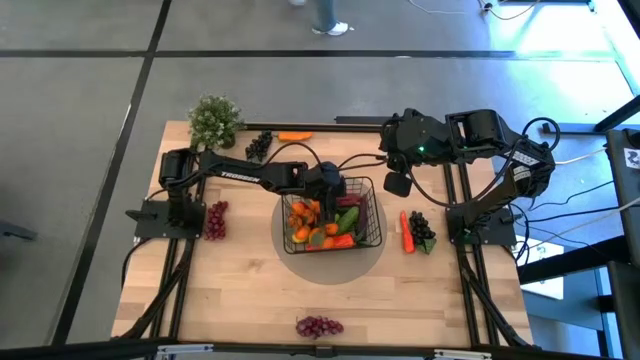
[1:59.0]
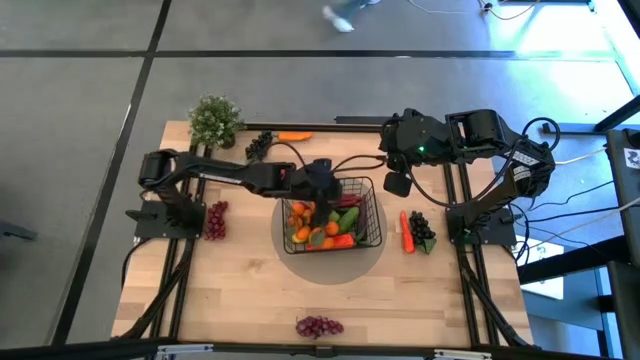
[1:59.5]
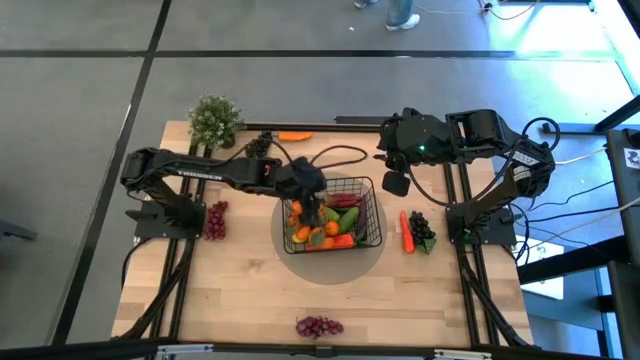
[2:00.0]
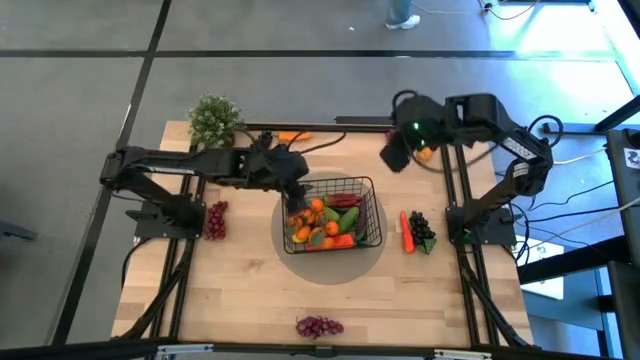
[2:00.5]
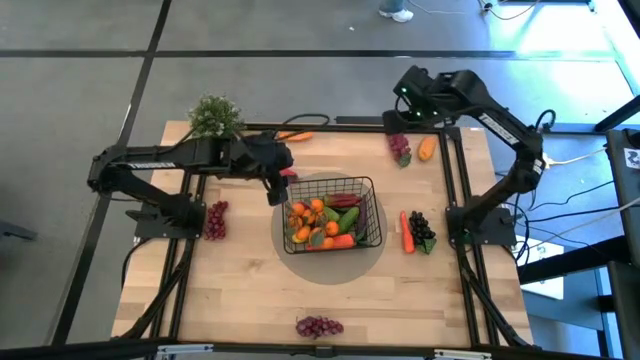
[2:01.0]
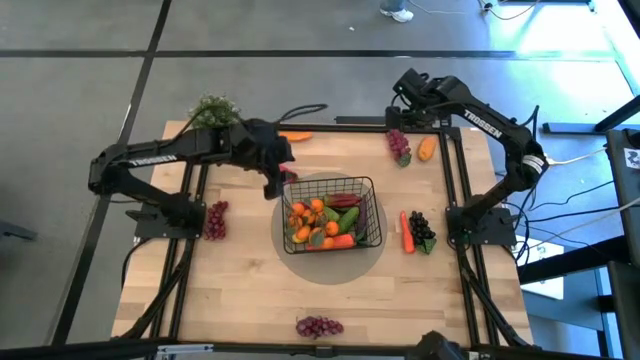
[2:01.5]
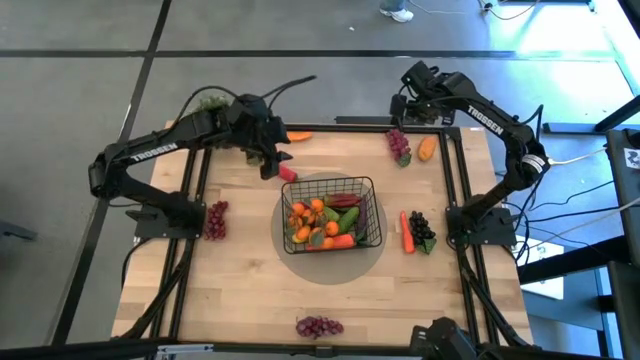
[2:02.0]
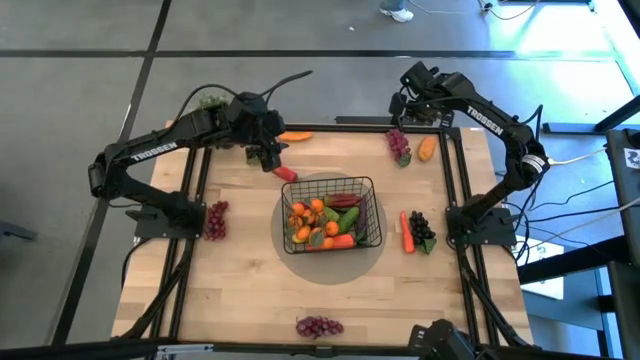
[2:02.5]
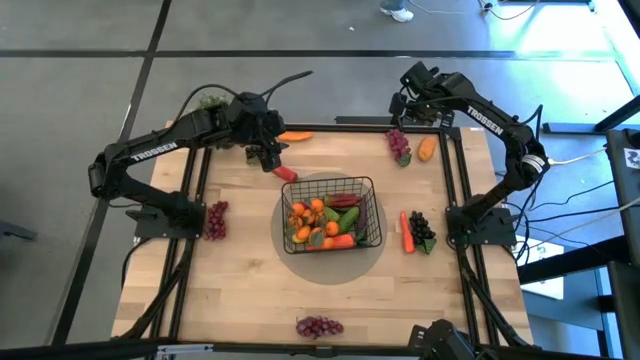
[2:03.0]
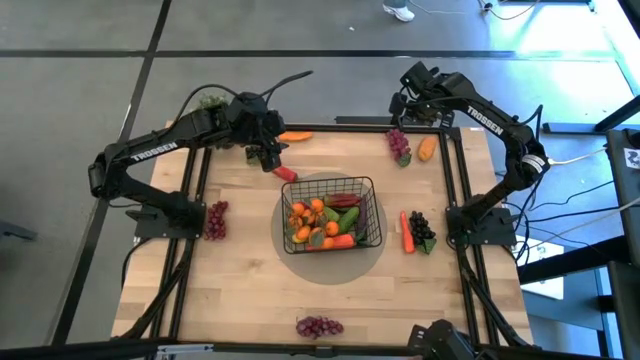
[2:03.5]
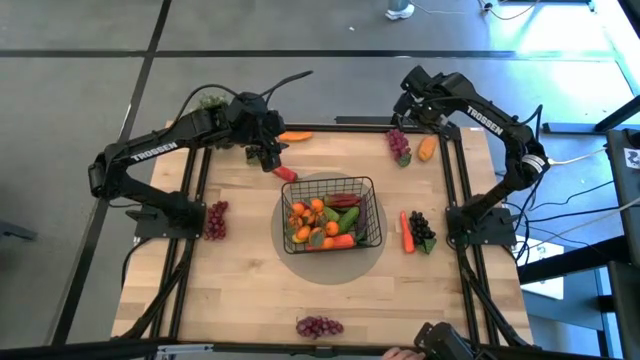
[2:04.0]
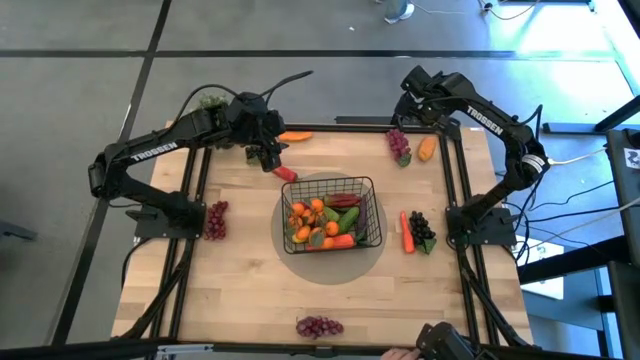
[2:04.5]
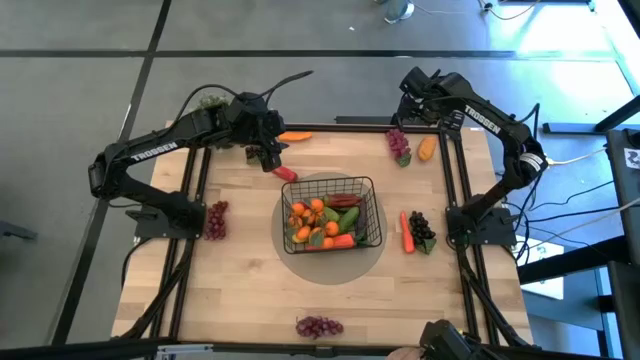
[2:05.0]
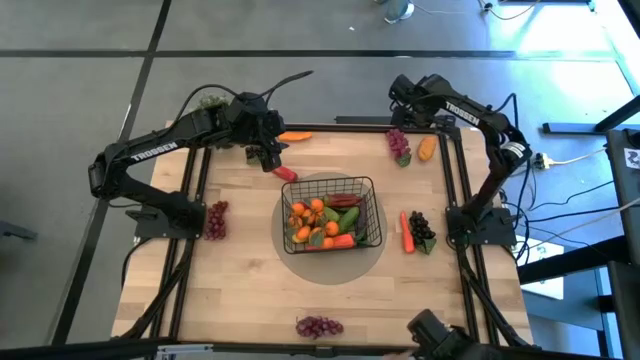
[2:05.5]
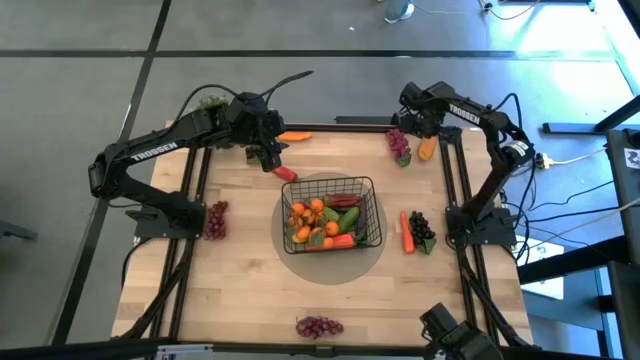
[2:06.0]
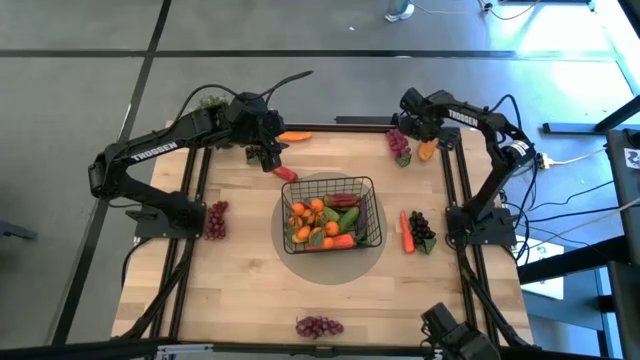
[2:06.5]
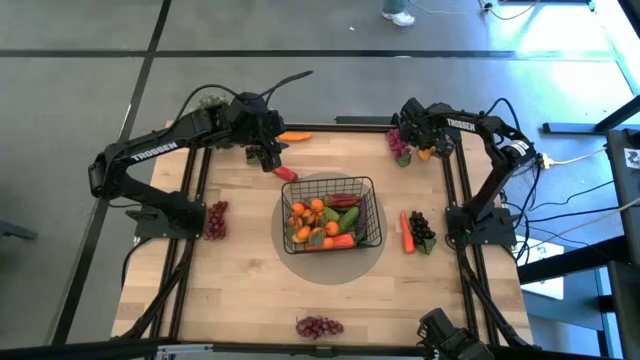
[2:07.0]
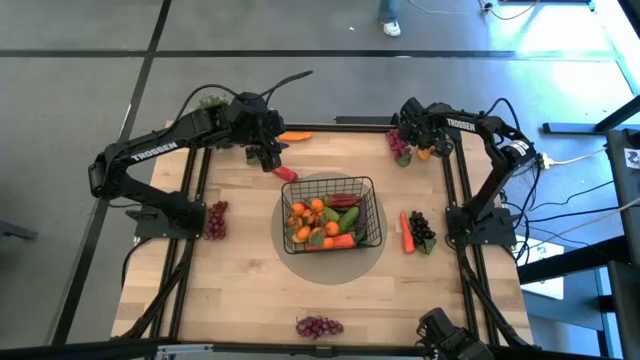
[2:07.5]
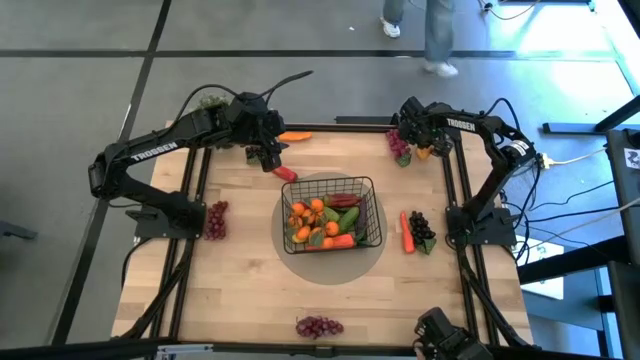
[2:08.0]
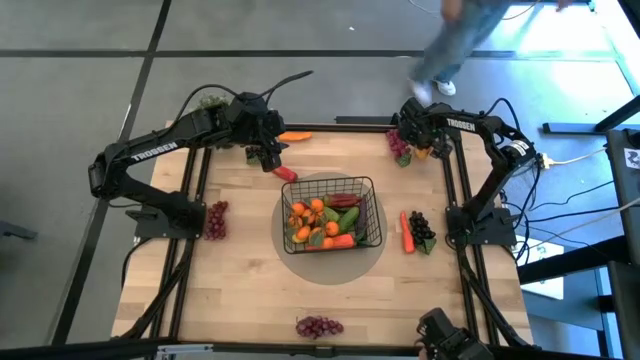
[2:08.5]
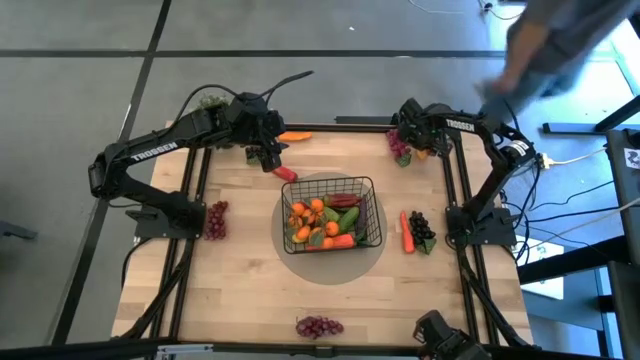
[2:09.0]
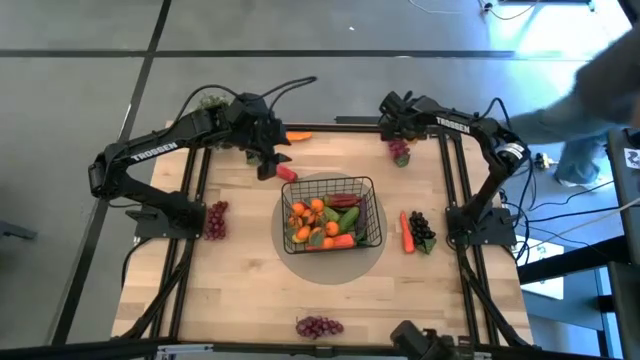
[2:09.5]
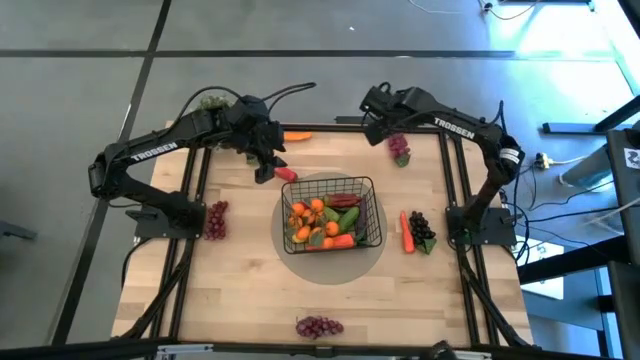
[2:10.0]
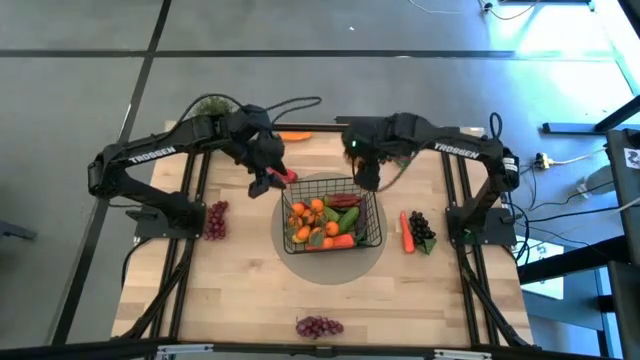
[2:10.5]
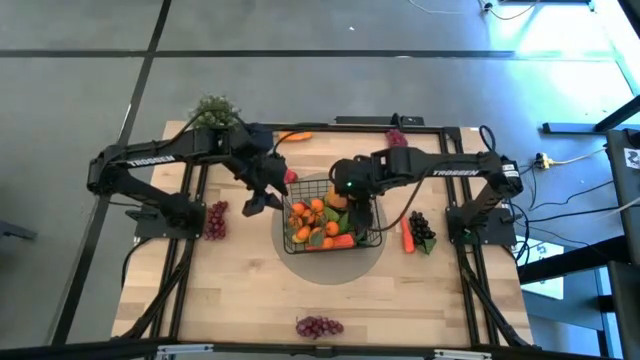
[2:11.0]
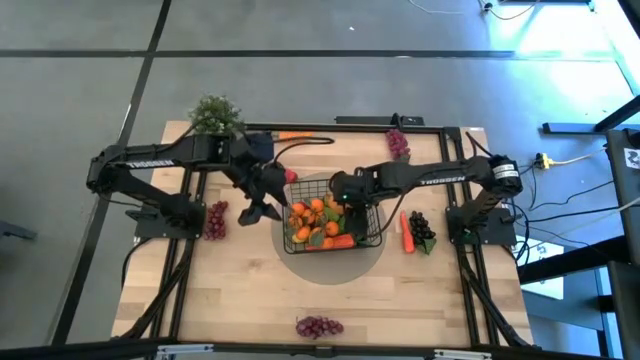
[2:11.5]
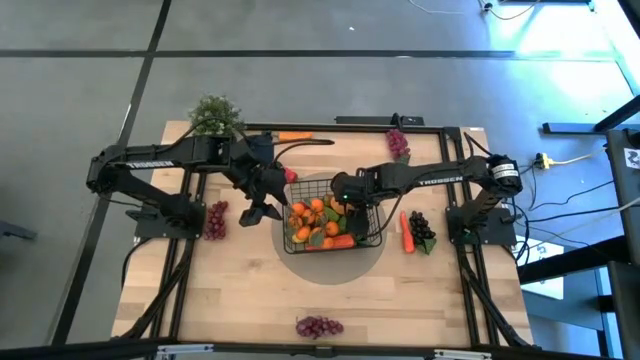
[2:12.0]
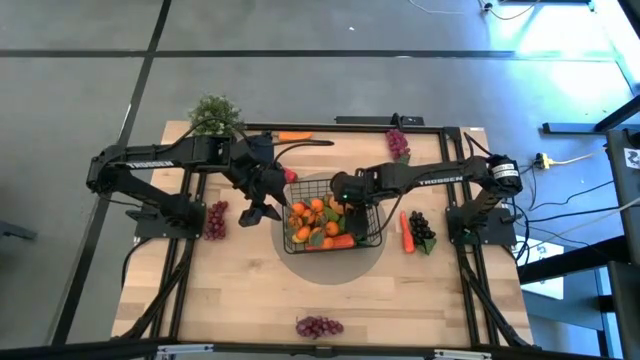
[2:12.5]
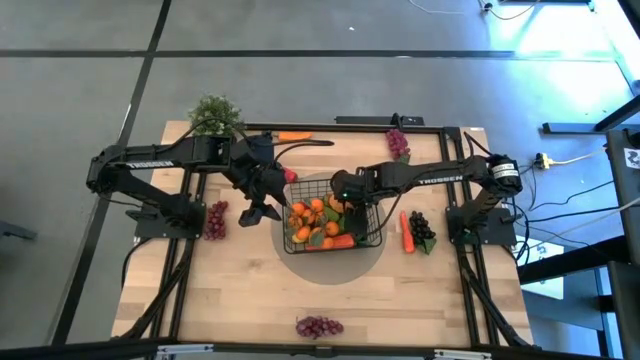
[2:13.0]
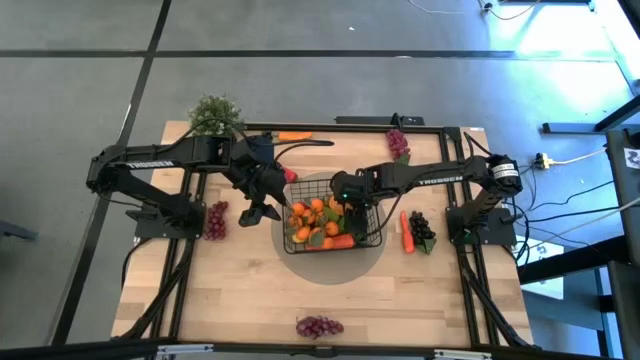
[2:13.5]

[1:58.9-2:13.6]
Task: Build produce basket
Put the mango into the basket

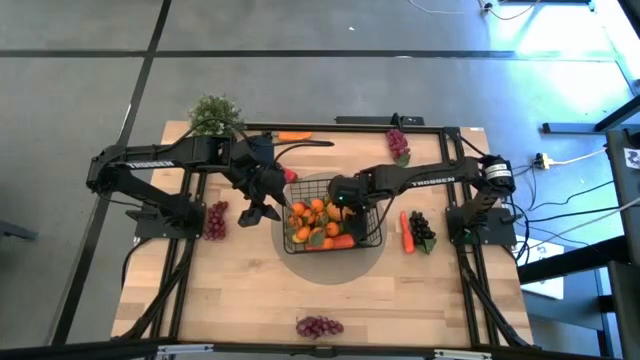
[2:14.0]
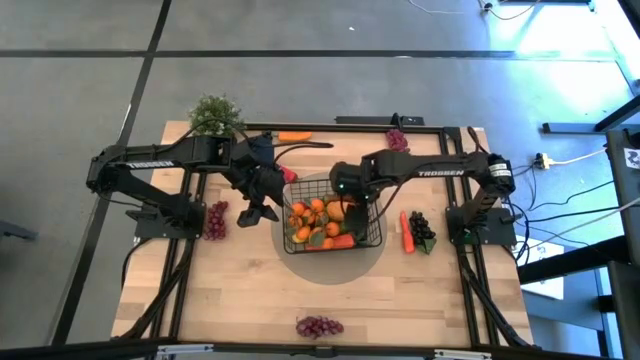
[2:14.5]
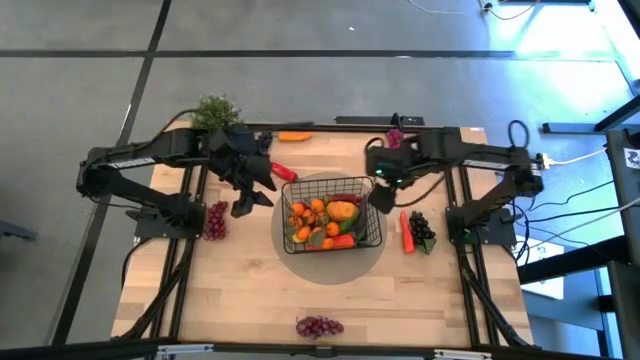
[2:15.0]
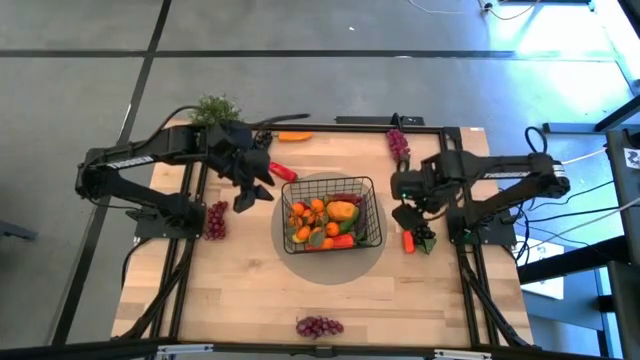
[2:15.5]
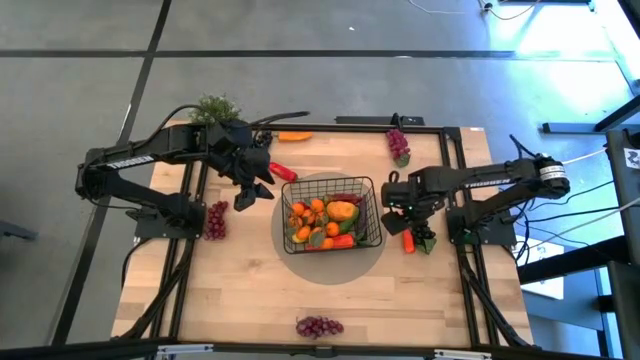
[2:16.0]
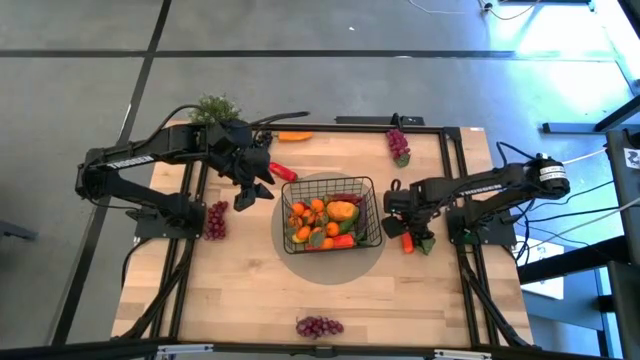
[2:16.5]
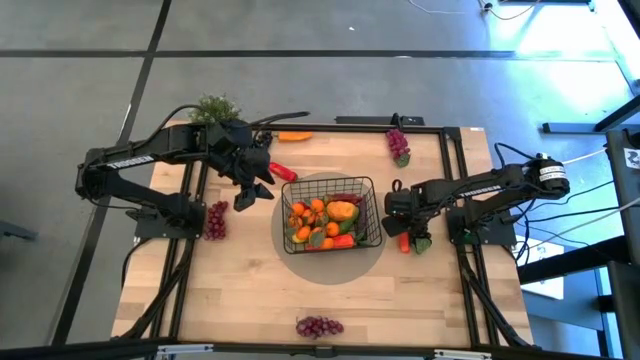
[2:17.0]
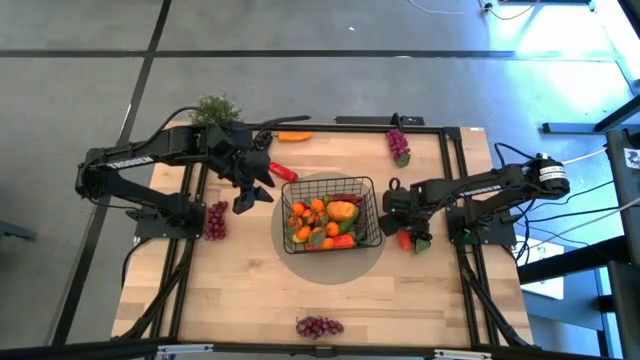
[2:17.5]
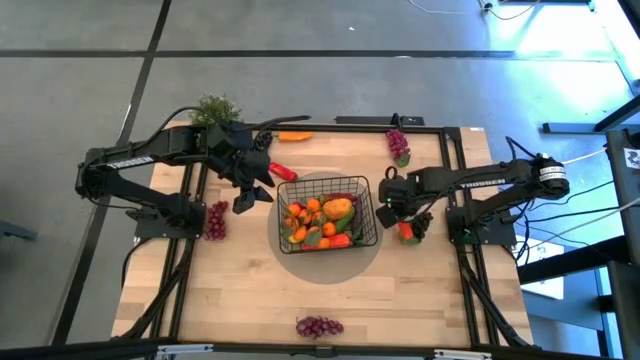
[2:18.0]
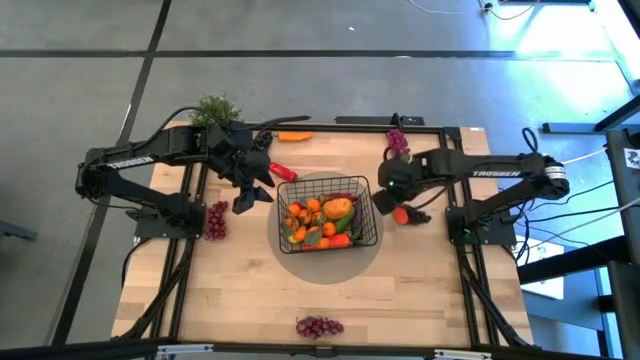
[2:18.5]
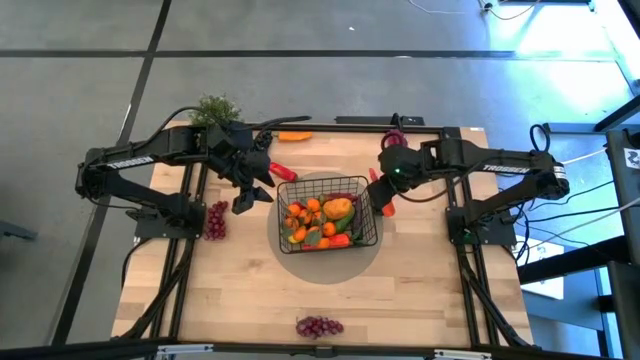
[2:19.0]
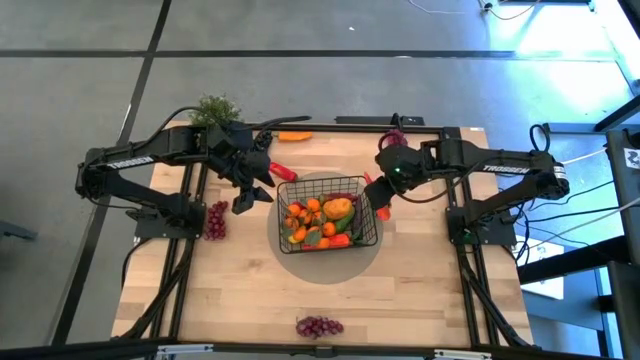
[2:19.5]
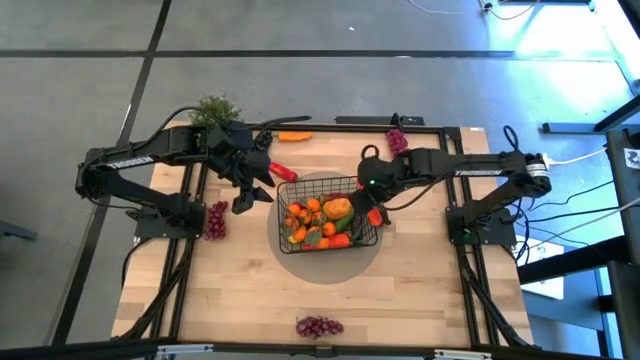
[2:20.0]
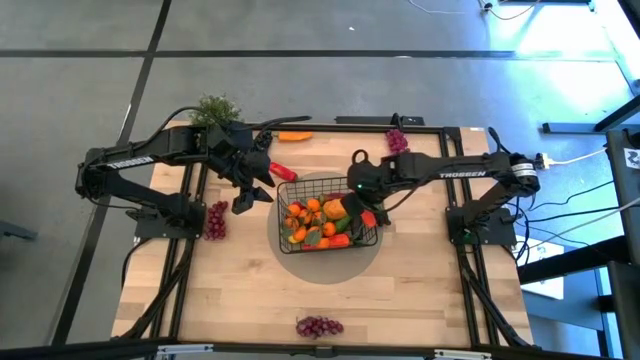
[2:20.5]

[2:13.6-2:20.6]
Put the carrot into the basket
